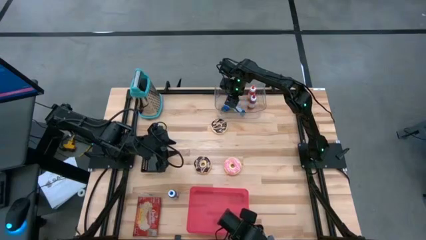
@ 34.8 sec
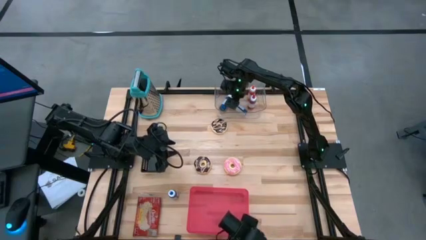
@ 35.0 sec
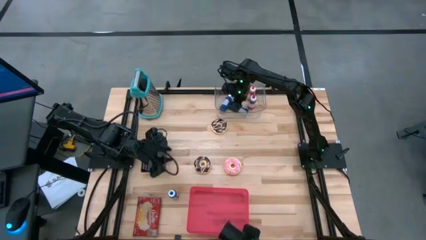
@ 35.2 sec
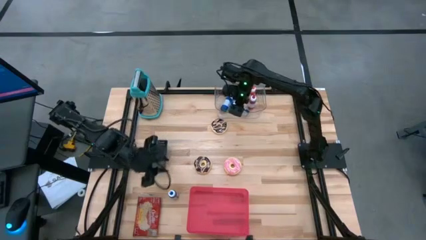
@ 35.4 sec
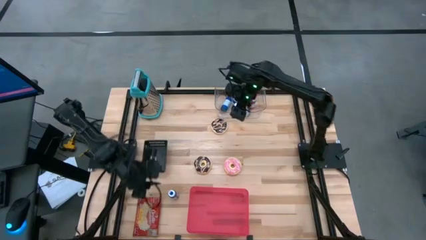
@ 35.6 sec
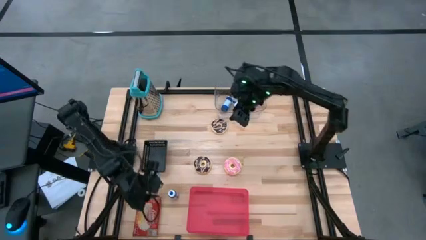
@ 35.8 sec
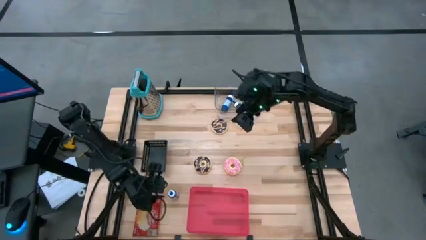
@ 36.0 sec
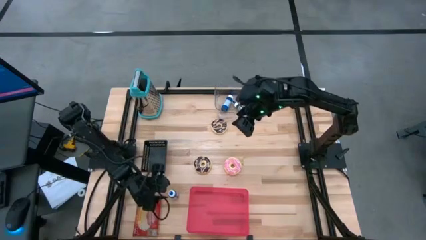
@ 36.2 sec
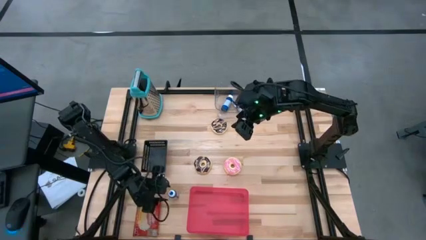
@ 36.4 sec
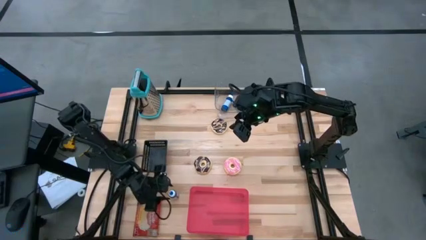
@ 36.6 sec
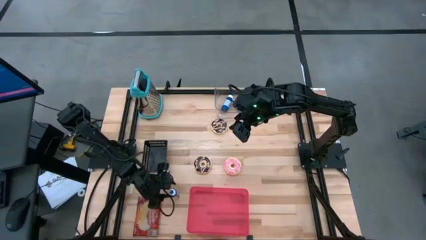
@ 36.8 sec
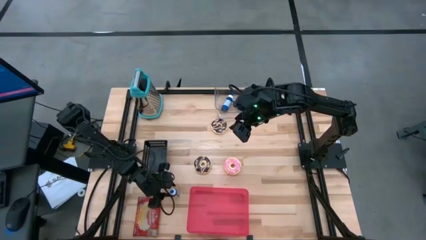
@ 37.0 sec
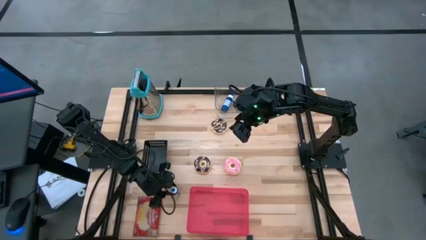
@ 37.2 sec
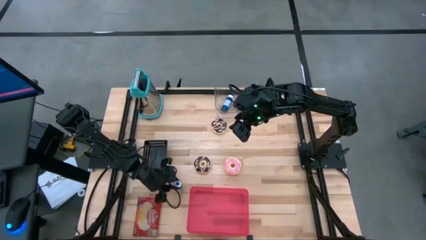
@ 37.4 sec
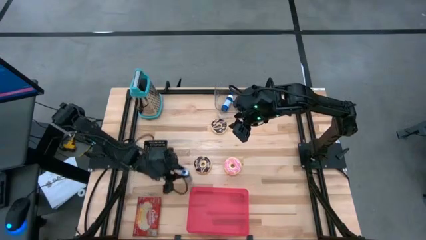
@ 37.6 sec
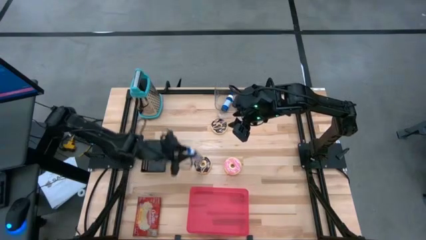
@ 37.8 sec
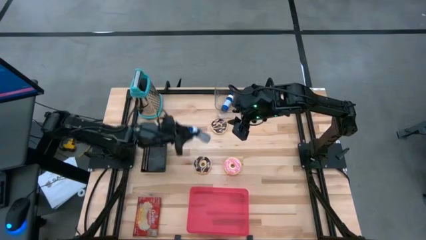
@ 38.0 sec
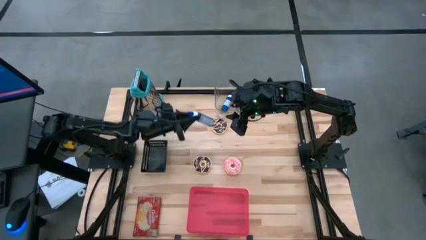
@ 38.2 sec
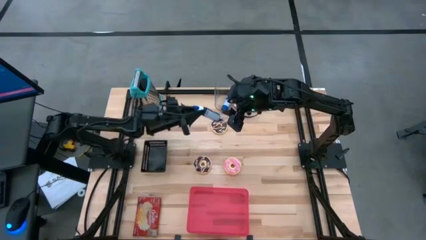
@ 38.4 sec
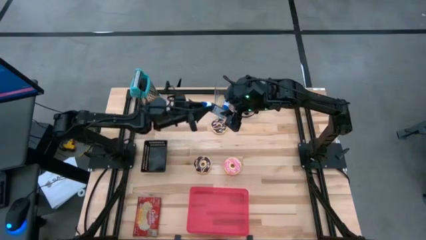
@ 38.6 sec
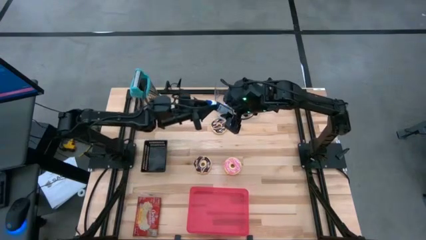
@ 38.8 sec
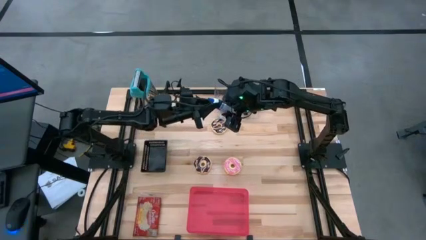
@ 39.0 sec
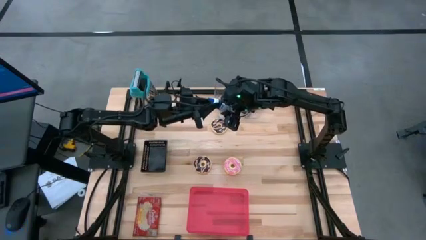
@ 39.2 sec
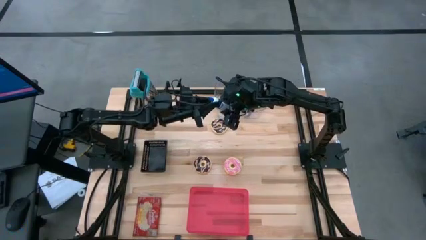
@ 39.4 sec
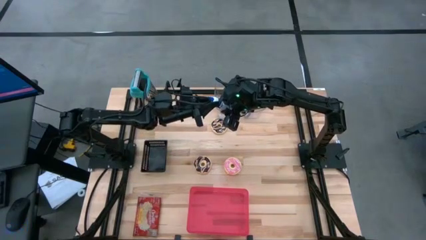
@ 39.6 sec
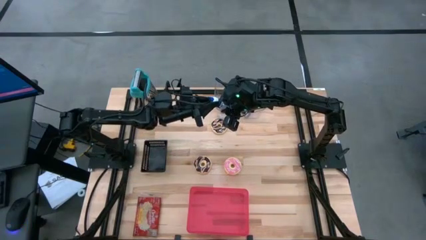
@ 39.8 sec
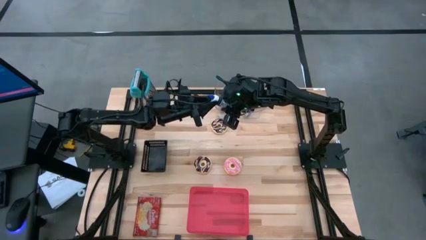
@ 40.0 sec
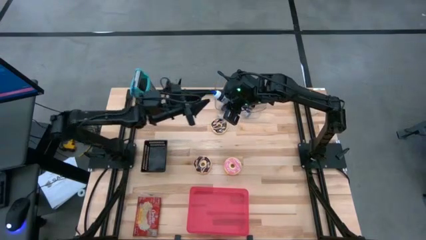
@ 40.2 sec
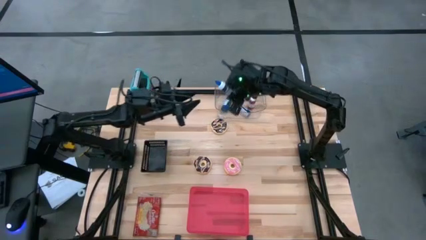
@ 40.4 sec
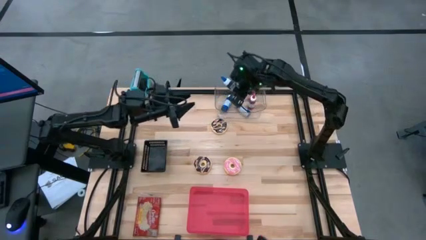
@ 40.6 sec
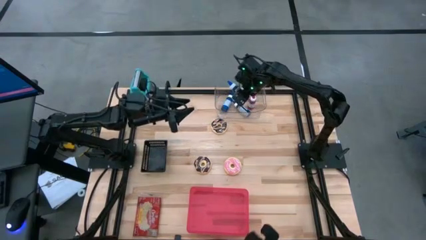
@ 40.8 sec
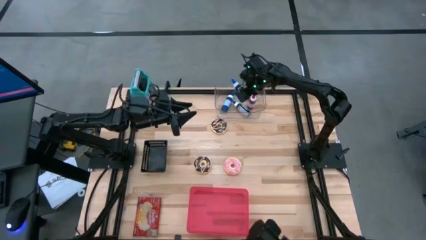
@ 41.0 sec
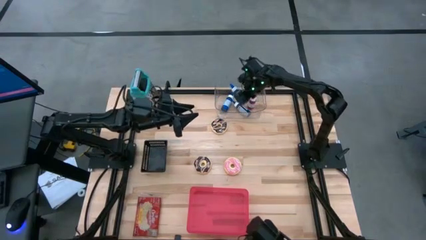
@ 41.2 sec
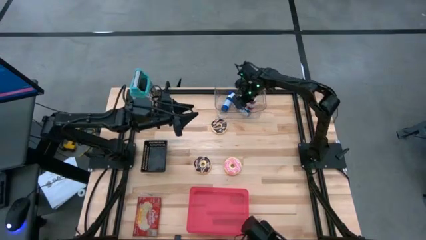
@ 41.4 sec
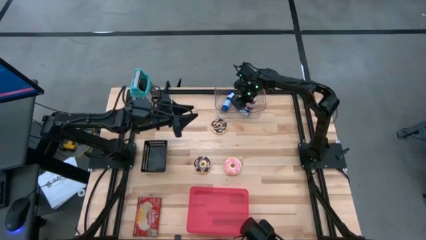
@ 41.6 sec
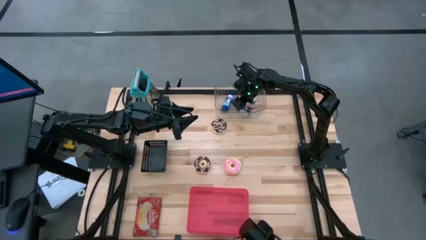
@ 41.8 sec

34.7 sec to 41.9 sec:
Put the blue food coloring bottle into the transparent bin

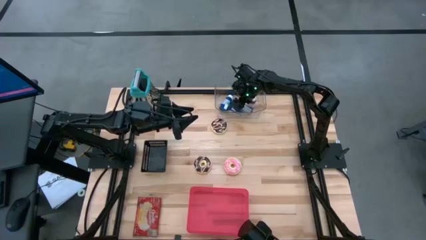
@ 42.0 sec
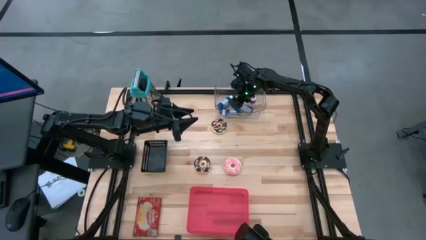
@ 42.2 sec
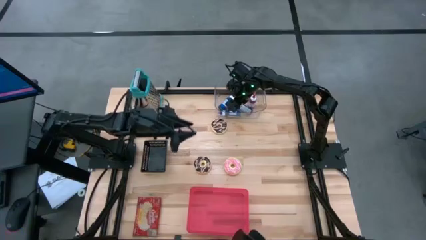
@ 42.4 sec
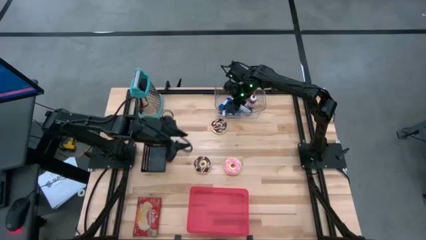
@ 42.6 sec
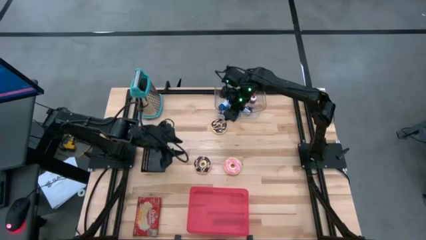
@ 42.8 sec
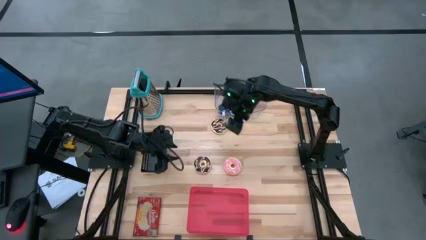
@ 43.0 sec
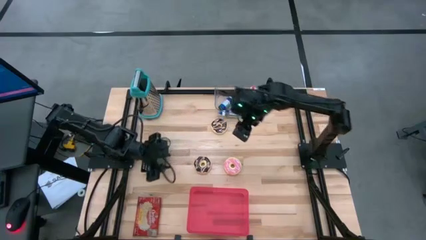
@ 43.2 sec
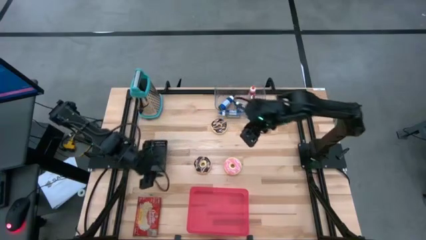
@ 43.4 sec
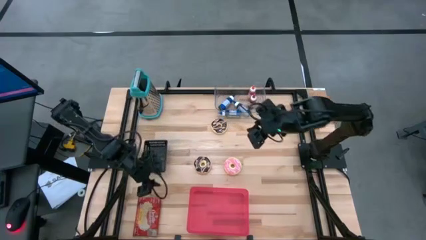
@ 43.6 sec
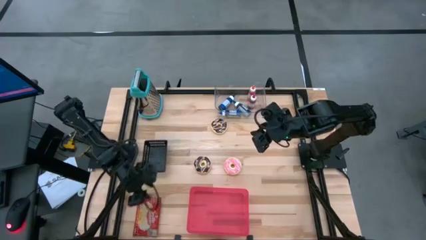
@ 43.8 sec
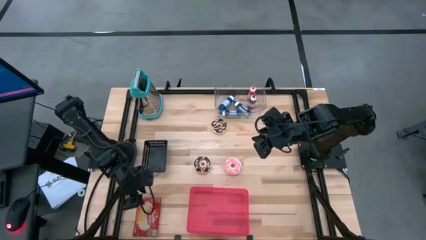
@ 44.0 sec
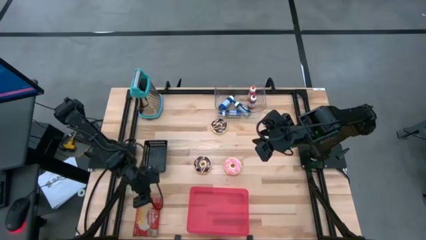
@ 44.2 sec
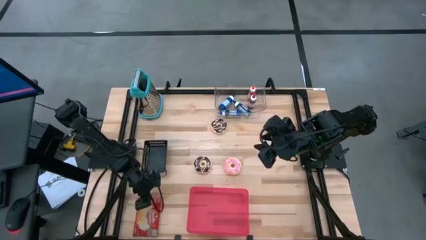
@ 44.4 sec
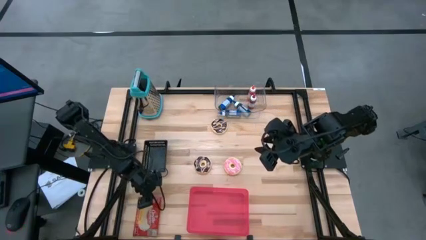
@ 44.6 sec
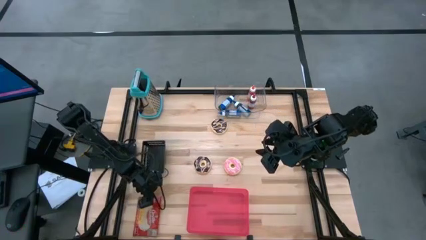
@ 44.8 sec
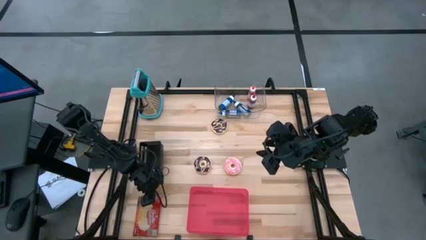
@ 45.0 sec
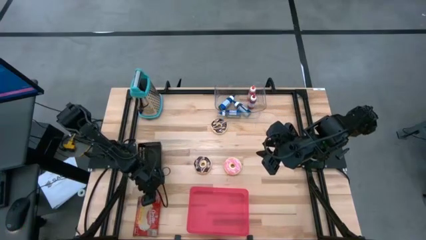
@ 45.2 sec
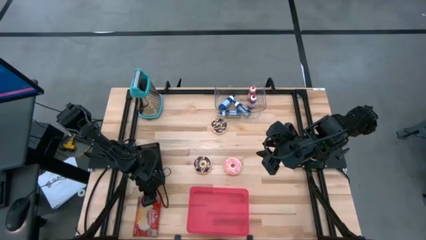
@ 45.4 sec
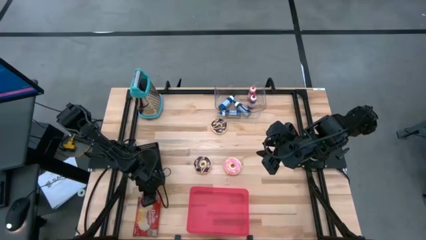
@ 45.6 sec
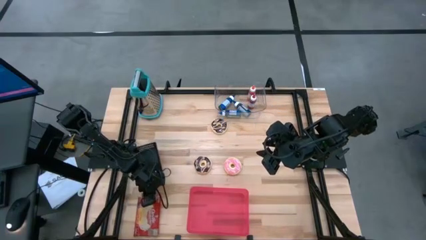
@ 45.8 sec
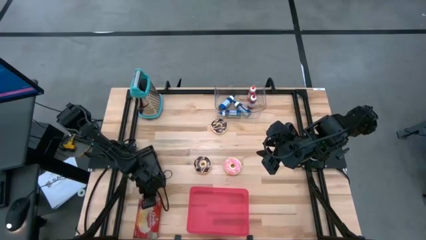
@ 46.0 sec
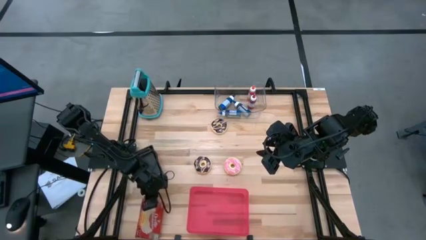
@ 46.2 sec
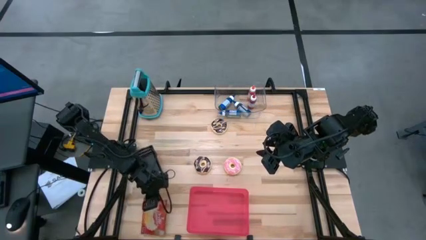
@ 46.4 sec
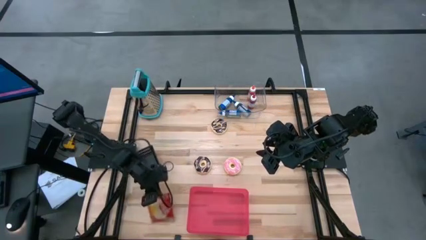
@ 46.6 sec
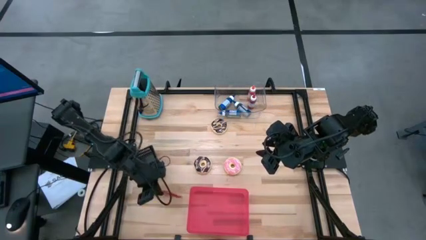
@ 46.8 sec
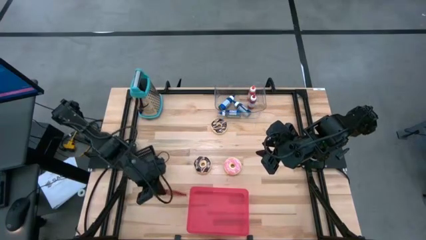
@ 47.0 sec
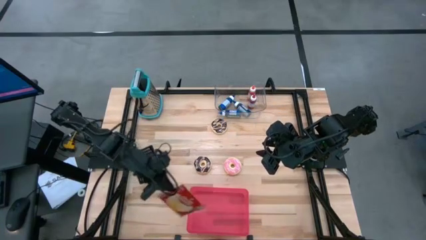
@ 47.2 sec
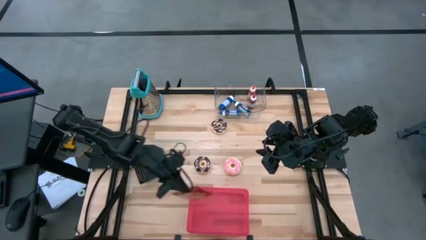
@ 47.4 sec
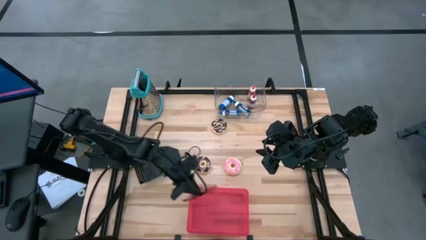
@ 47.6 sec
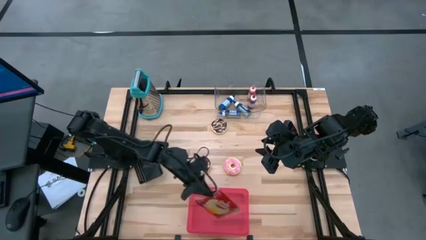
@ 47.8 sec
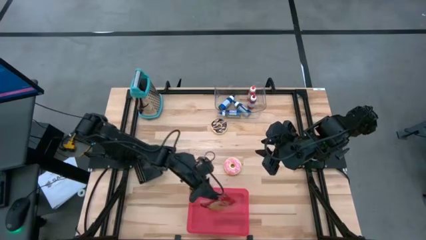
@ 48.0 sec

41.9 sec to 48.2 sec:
Put the red popcorn bag into the red bin

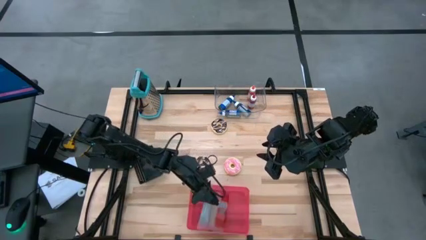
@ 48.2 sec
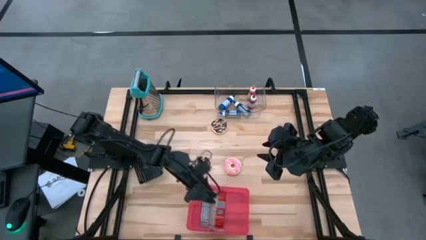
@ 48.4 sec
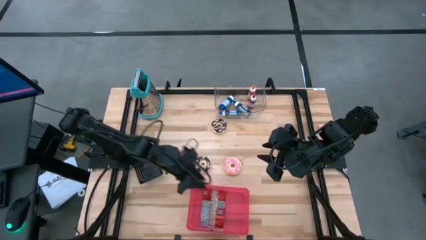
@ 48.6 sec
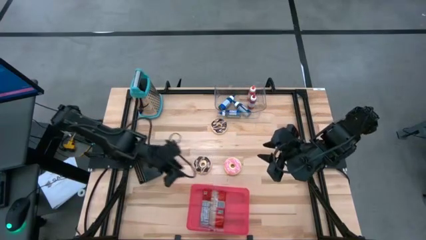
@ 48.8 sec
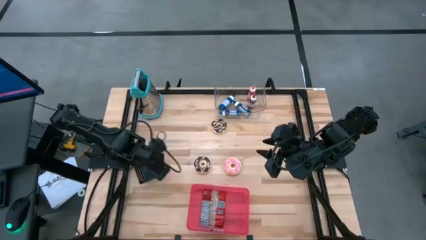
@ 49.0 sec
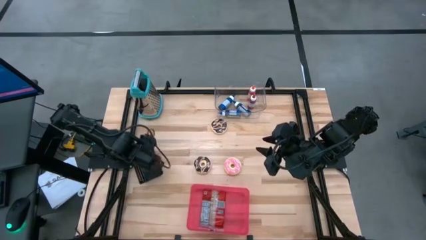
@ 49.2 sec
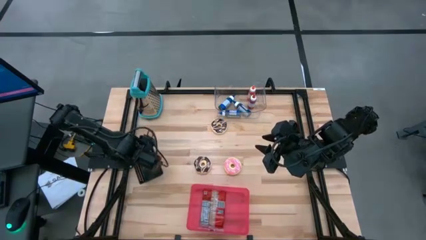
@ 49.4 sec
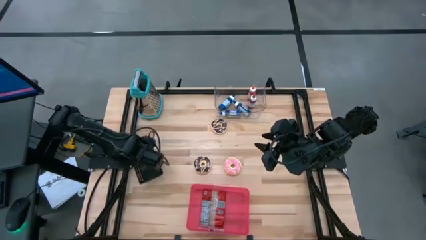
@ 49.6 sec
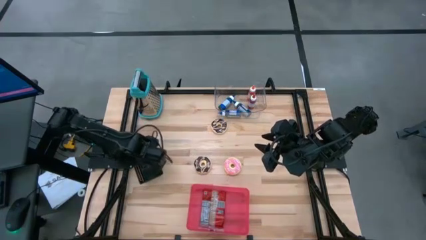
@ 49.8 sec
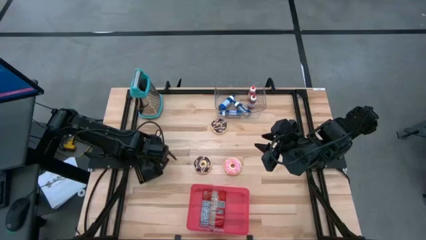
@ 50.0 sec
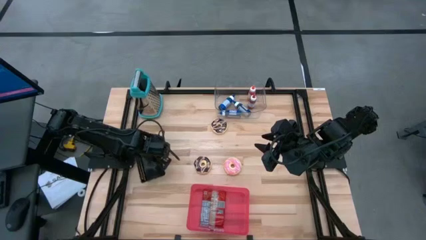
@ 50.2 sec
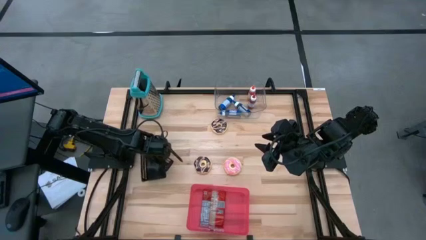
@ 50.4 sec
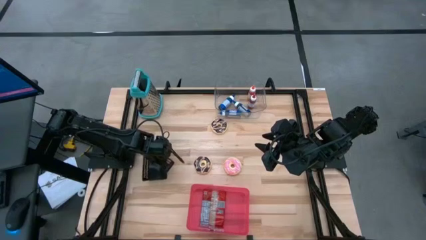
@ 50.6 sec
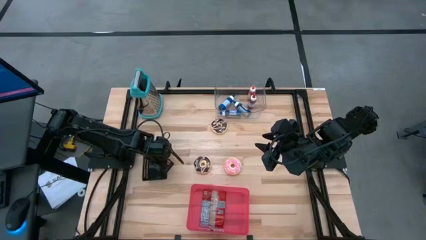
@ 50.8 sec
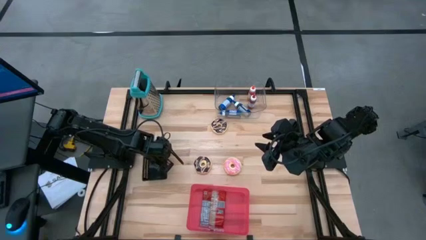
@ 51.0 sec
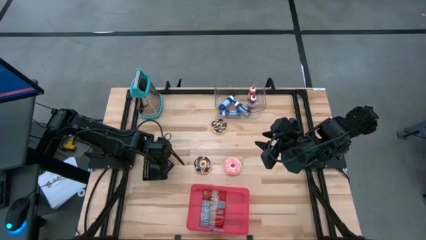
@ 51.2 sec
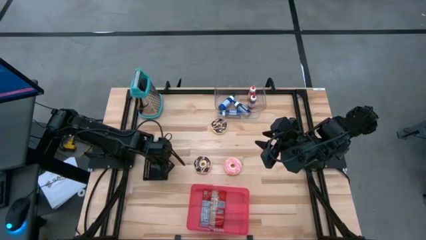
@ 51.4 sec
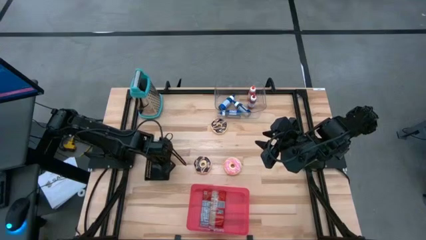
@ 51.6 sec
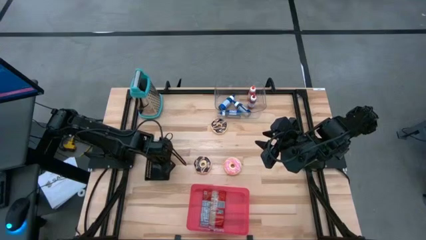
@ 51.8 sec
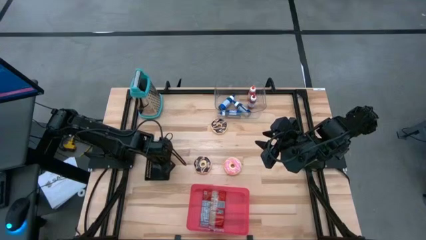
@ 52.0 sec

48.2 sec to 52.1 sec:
Adjust the black bin
